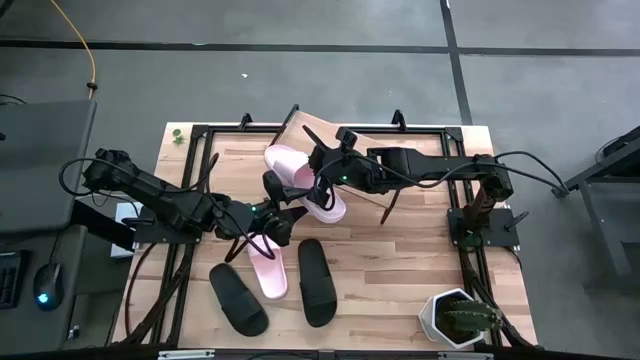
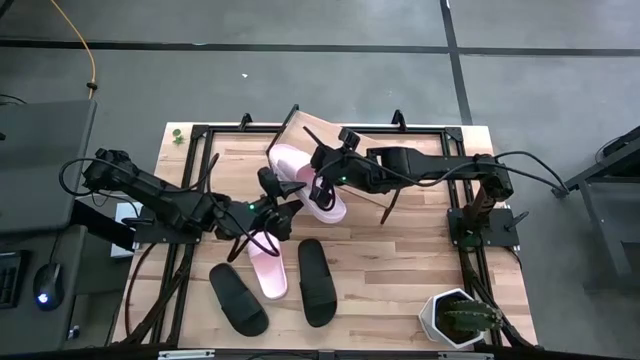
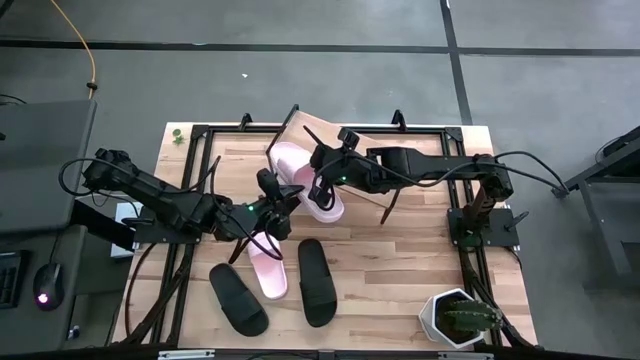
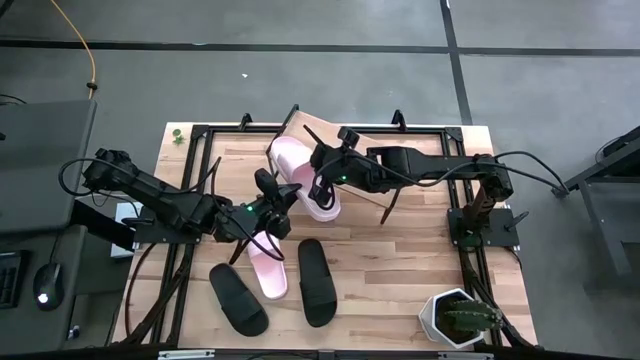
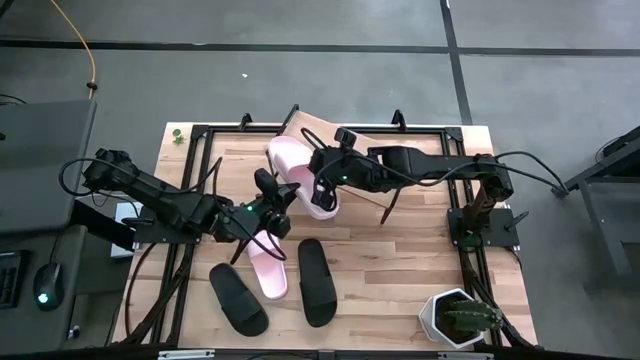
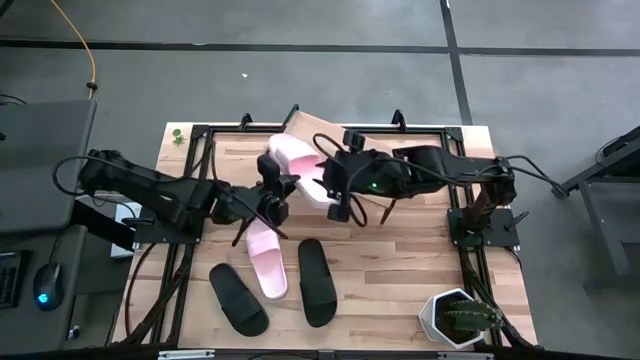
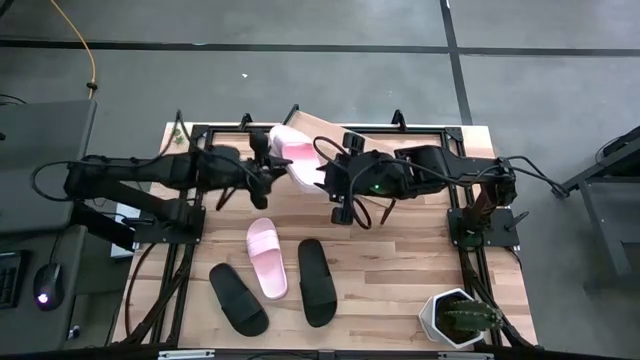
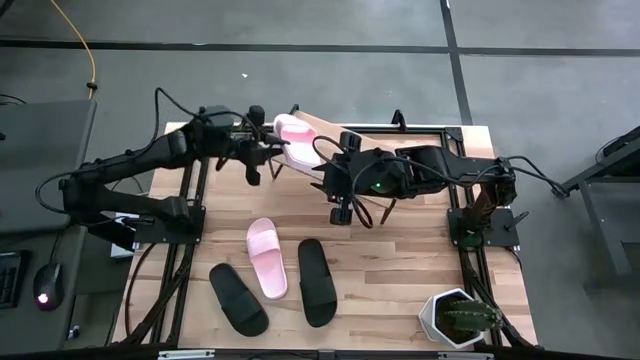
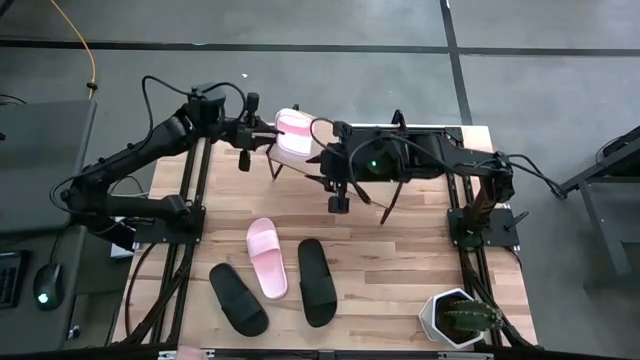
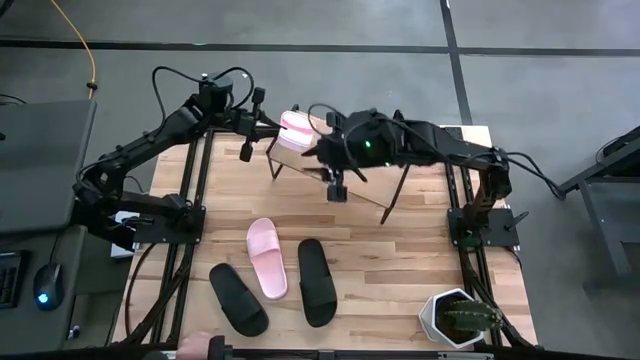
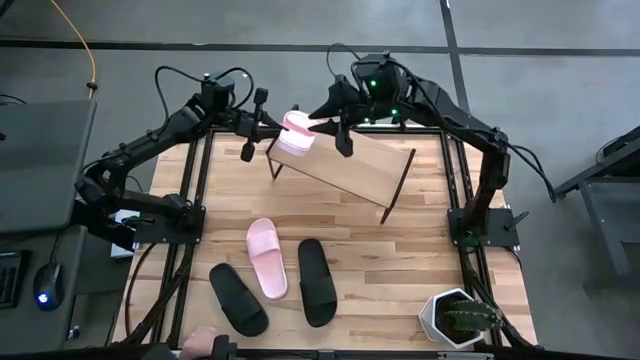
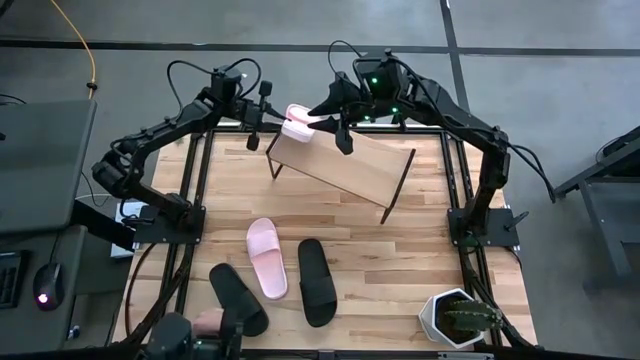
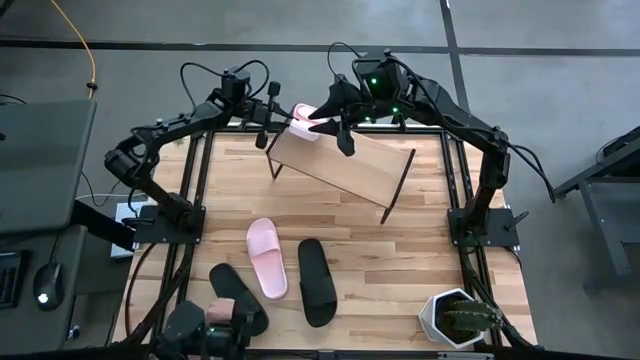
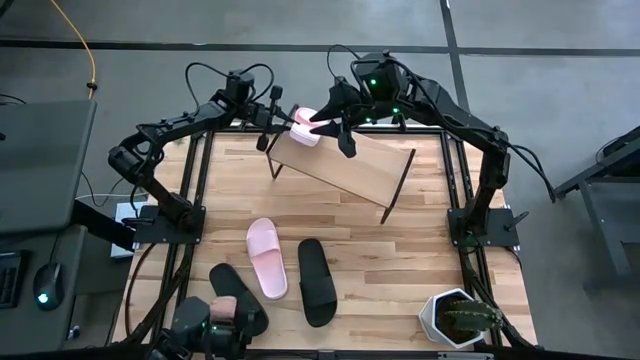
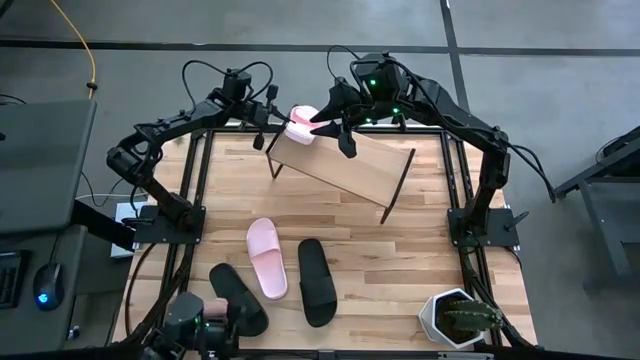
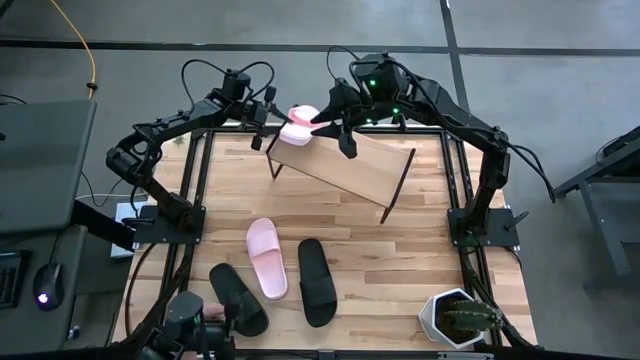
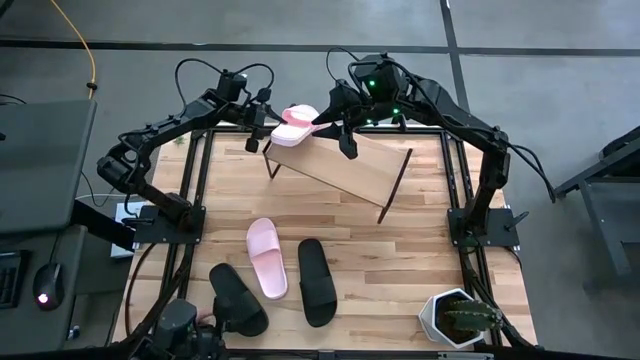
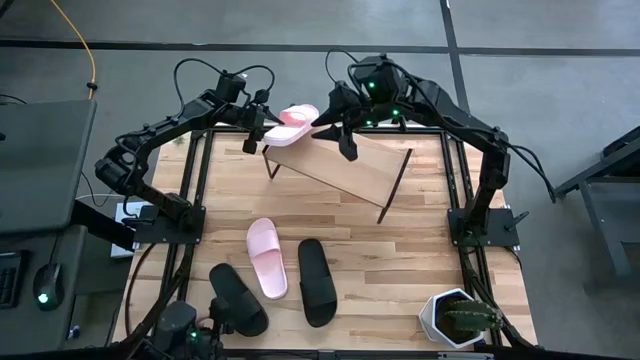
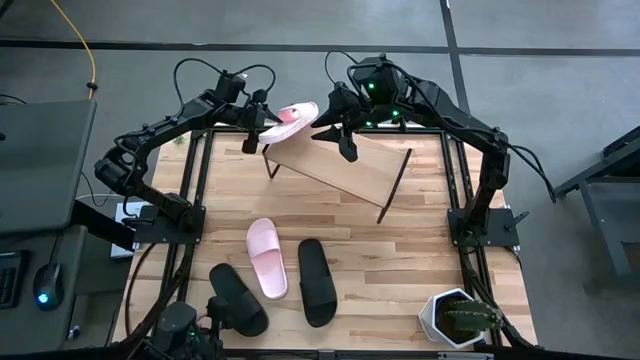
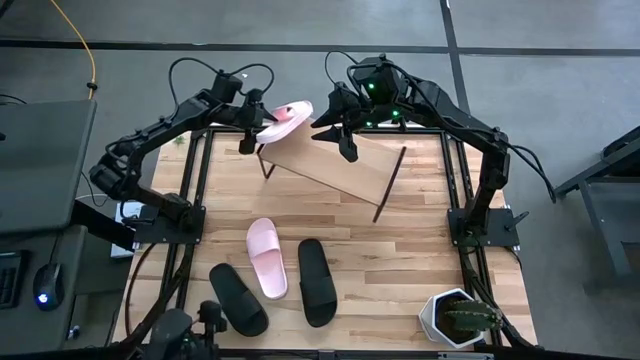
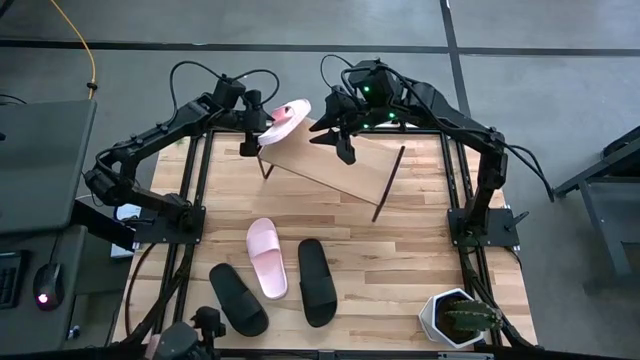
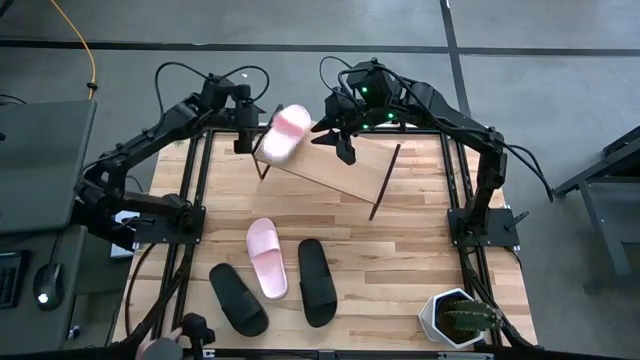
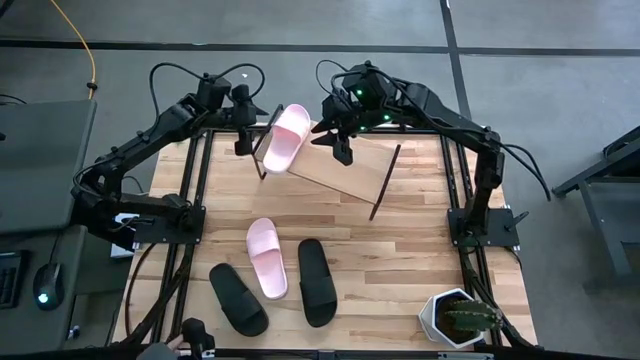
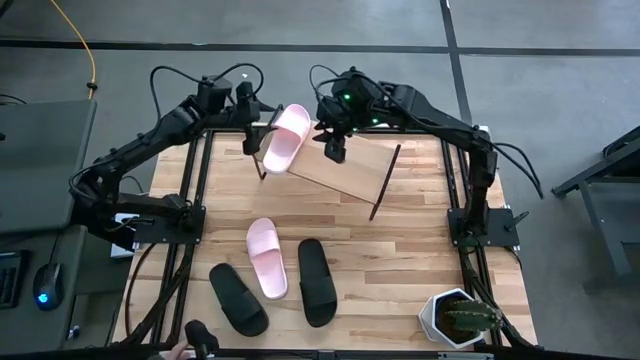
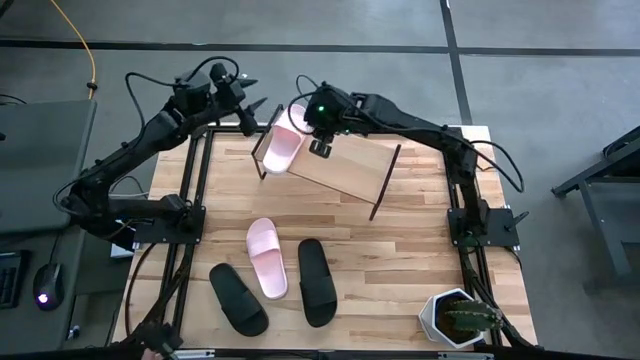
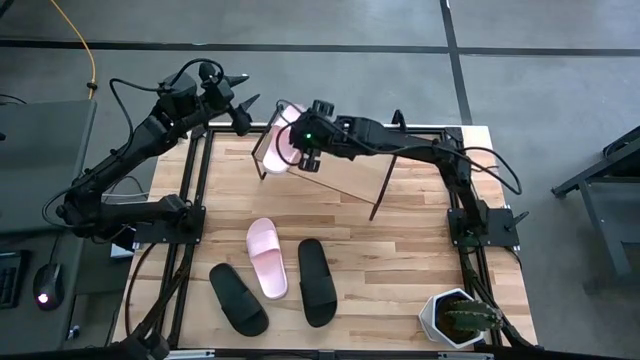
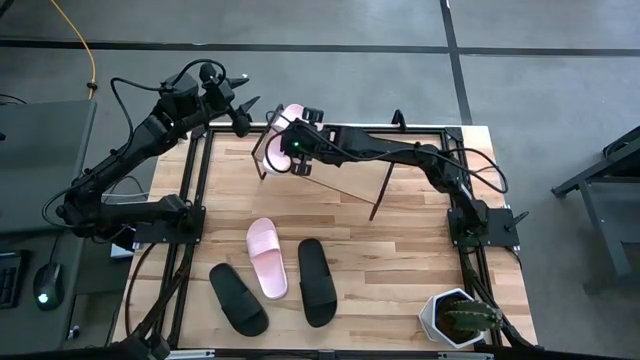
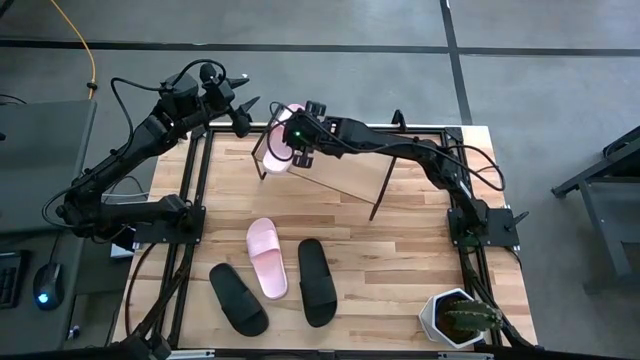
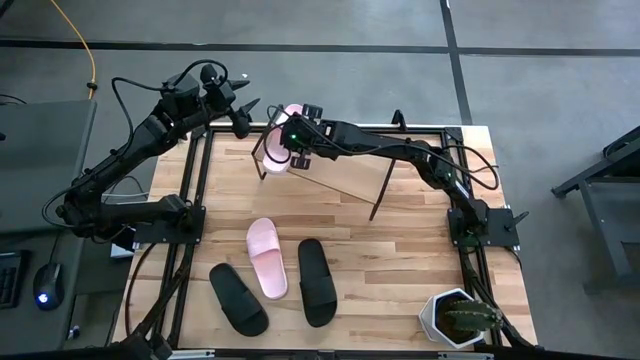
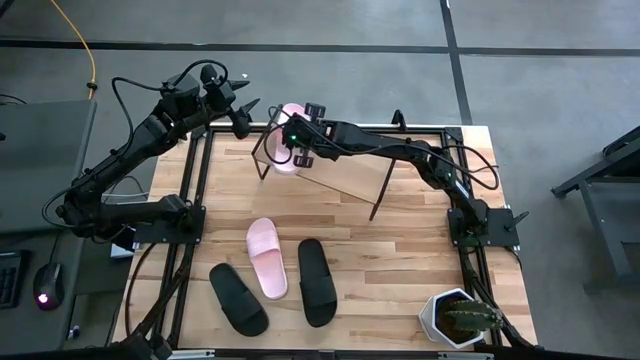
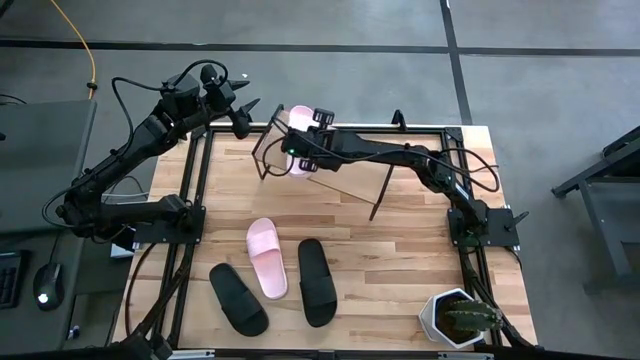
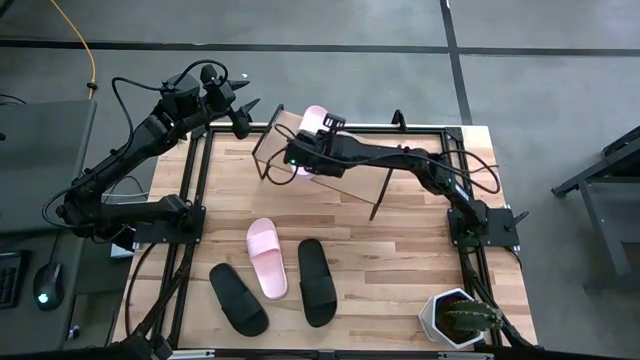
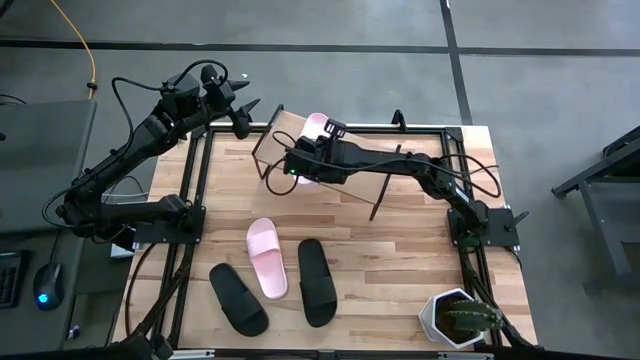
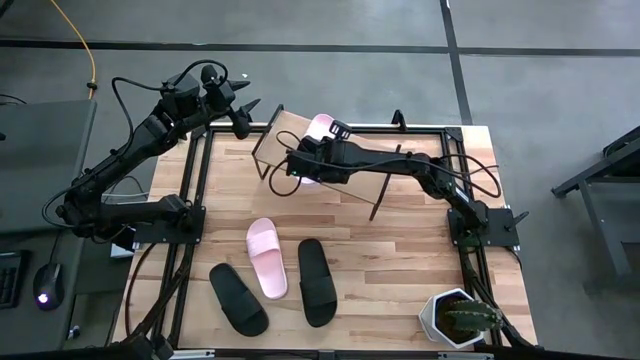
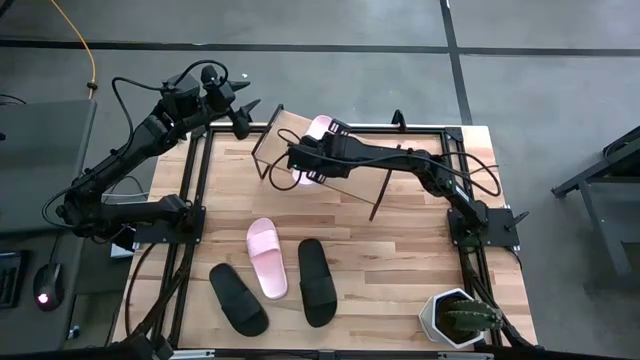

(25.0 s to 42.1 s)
Task: Pick and place slides into the shelf
Put the right pink slide on the shelf

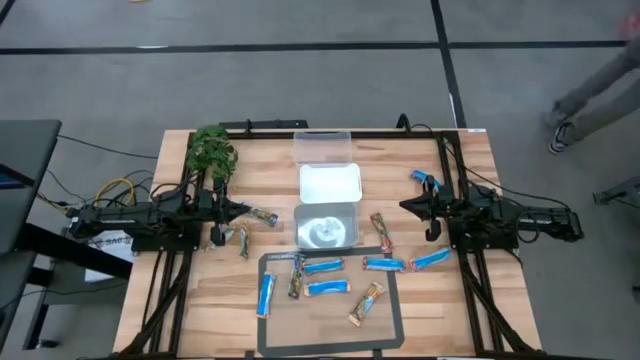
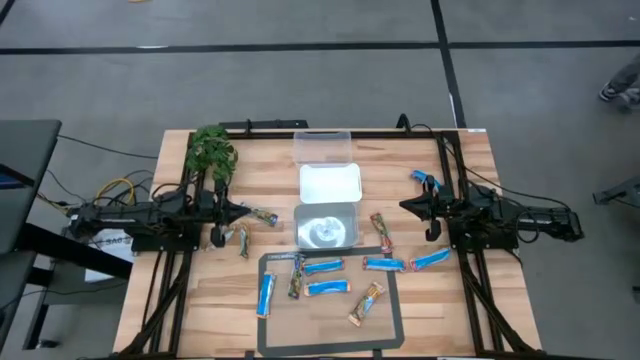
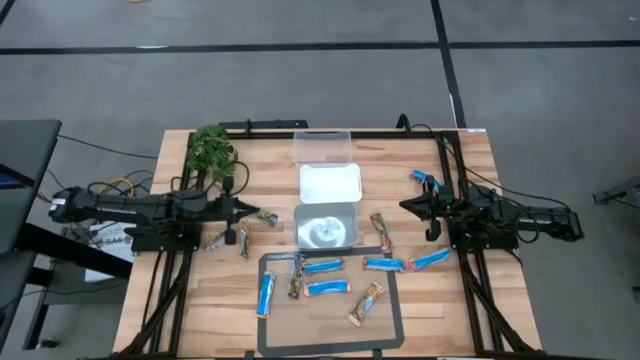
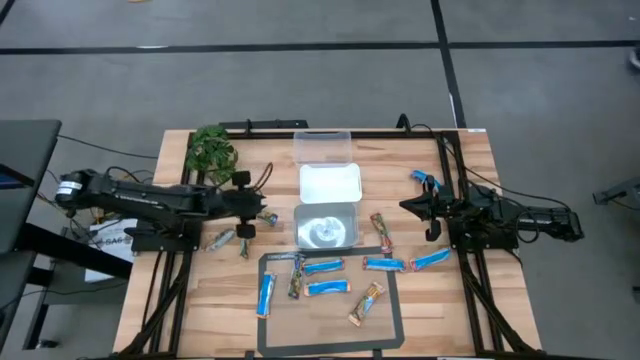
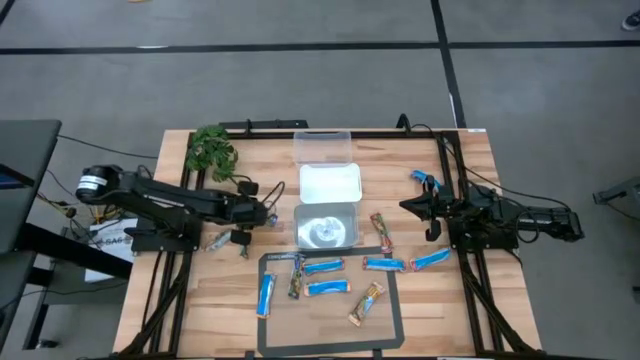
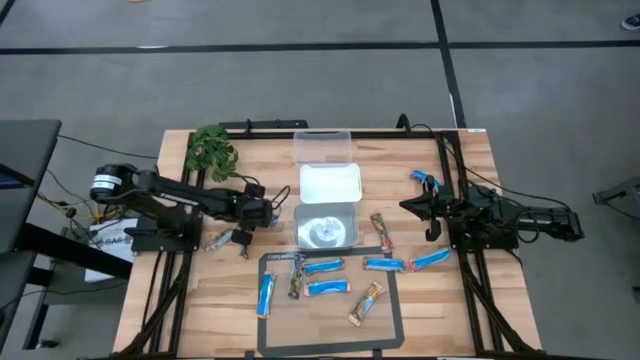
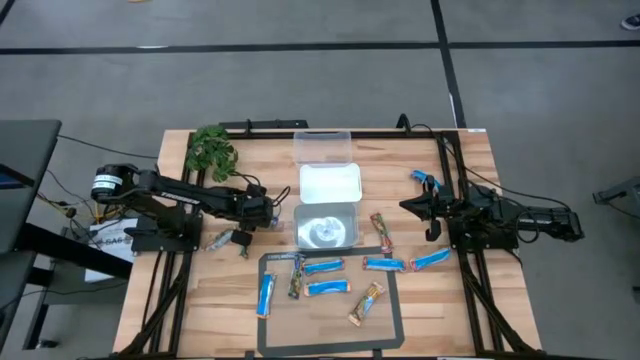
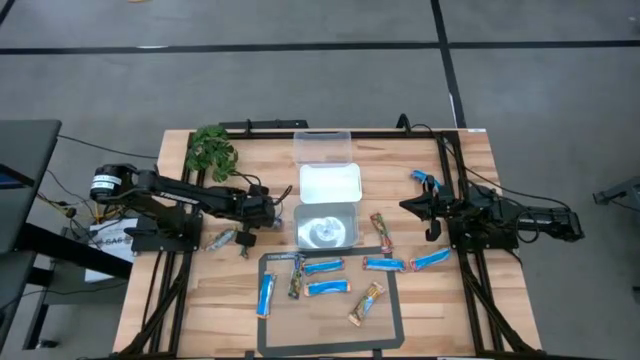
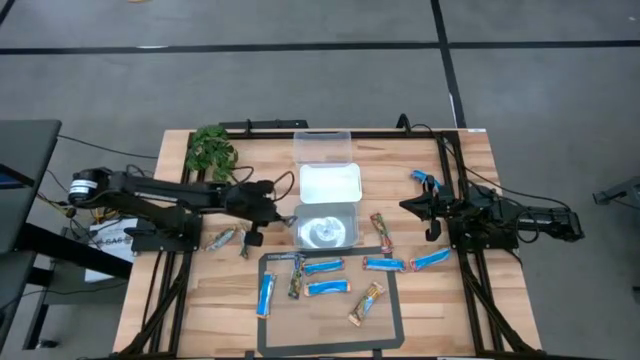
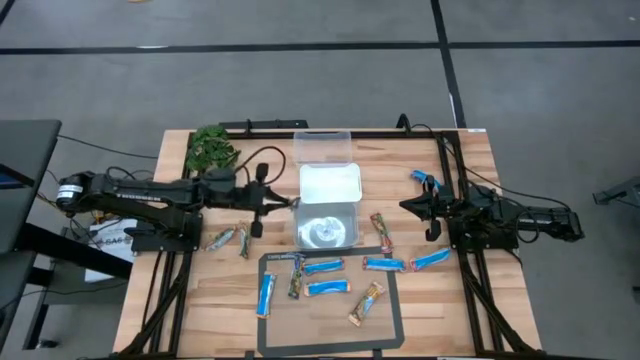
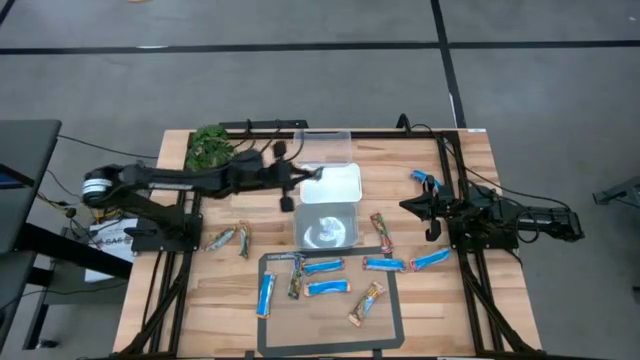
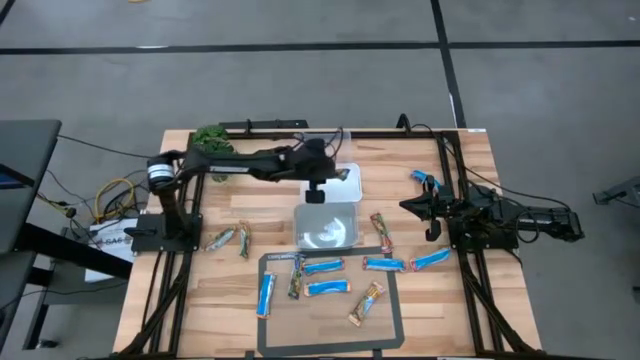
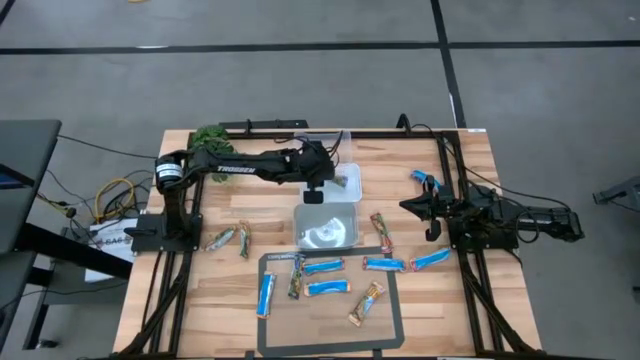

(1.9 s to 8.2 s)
Task: Pick and place Granola Bars by type
Put the blue granola bar into the white bin
